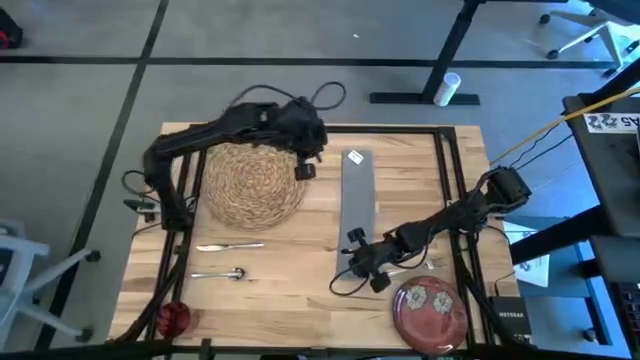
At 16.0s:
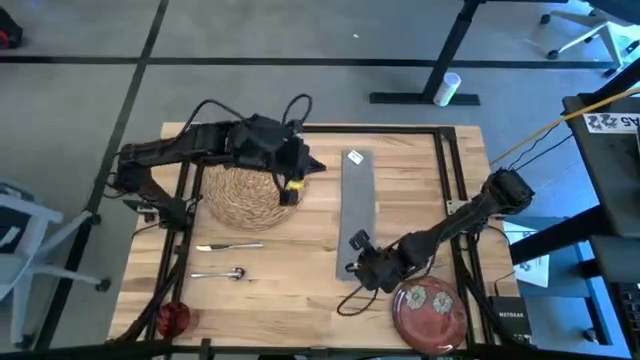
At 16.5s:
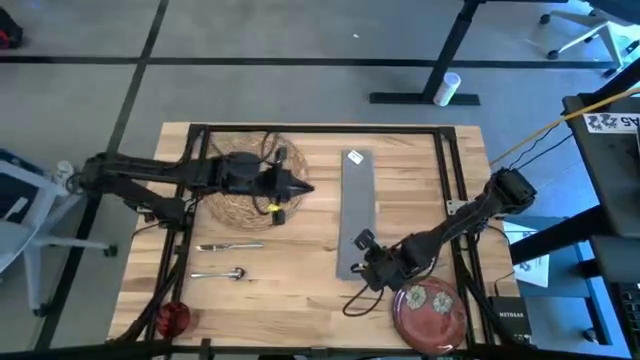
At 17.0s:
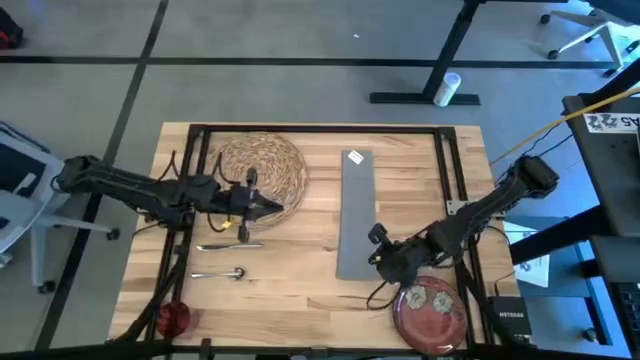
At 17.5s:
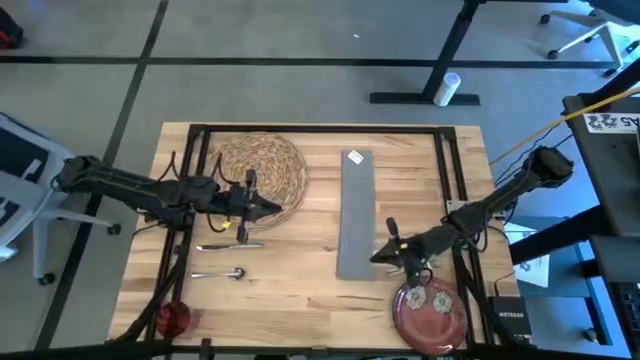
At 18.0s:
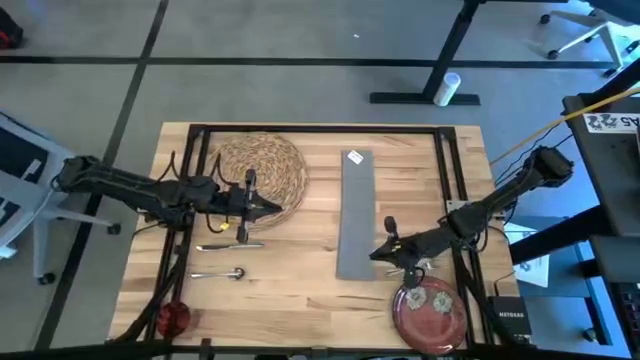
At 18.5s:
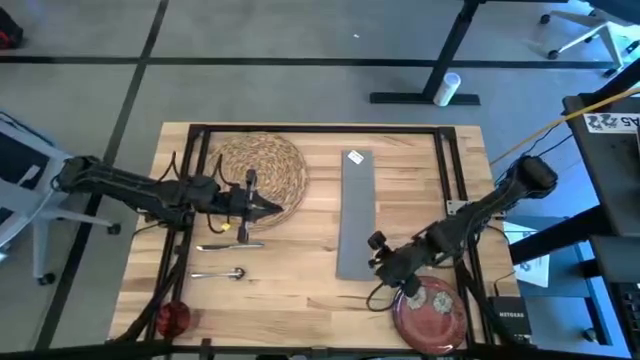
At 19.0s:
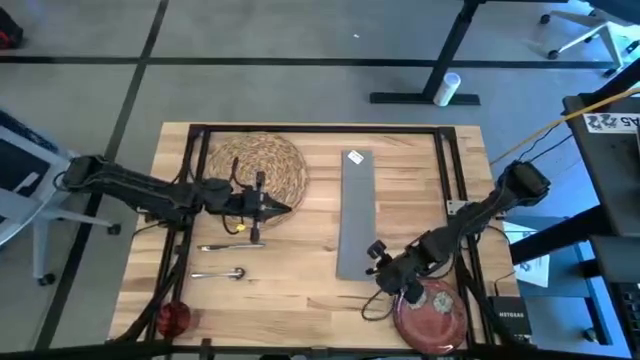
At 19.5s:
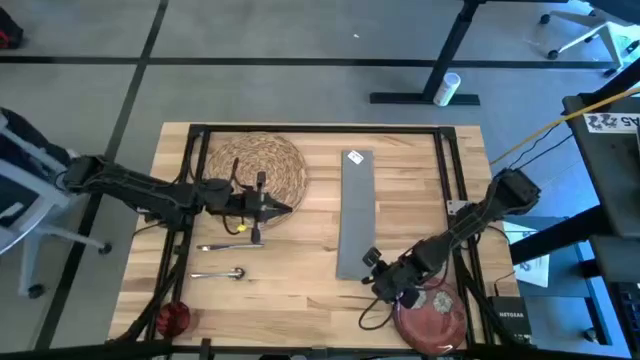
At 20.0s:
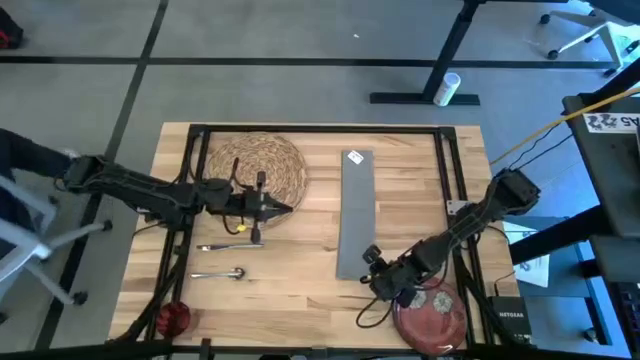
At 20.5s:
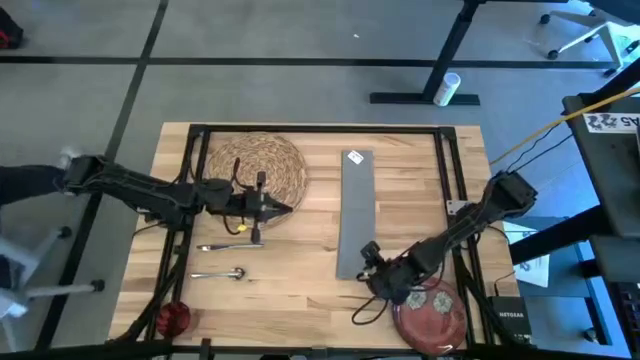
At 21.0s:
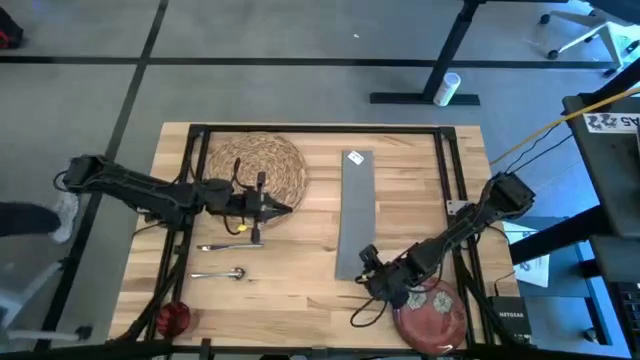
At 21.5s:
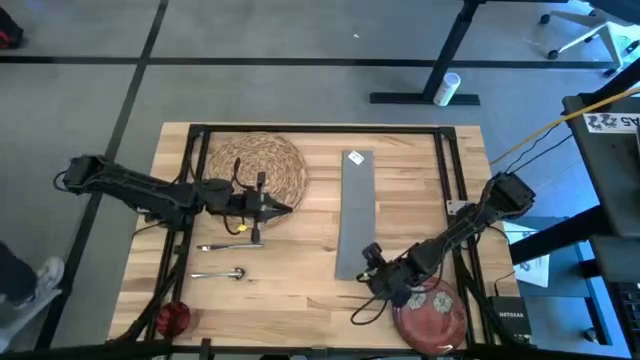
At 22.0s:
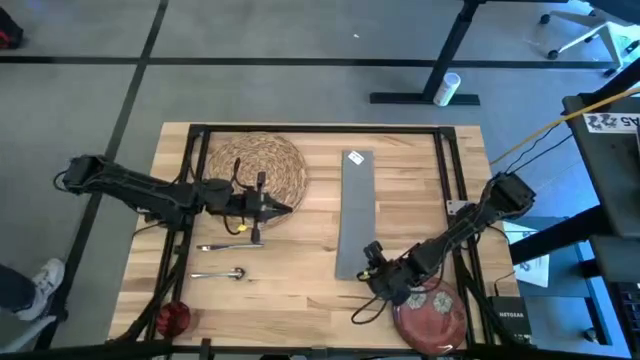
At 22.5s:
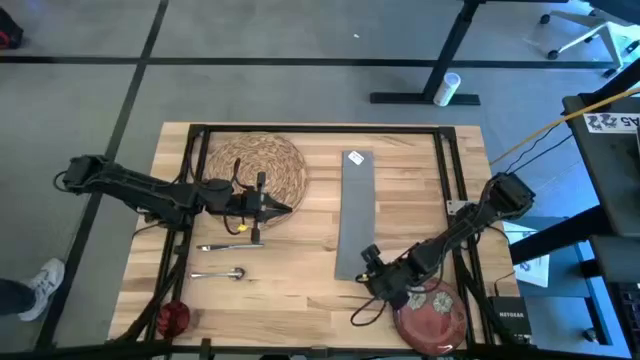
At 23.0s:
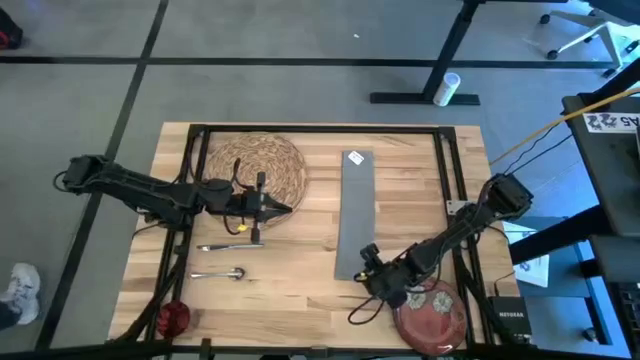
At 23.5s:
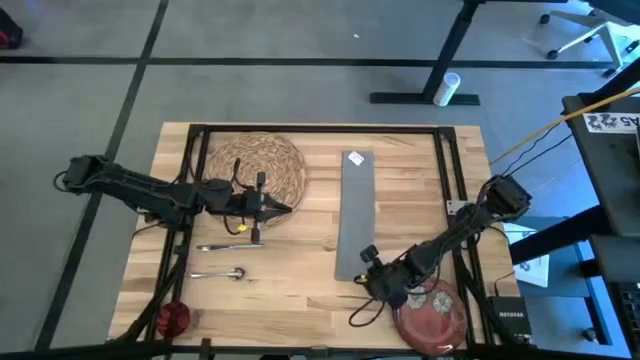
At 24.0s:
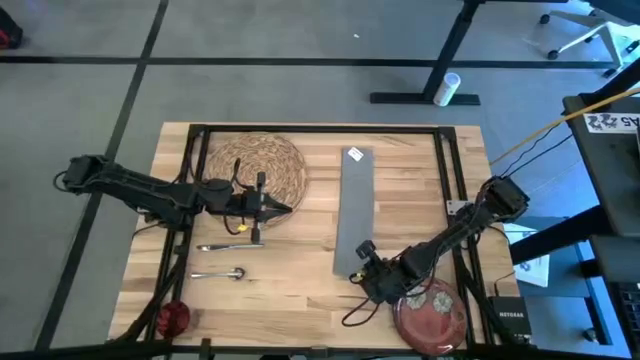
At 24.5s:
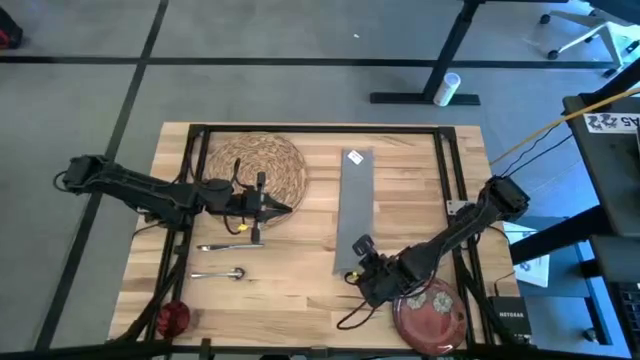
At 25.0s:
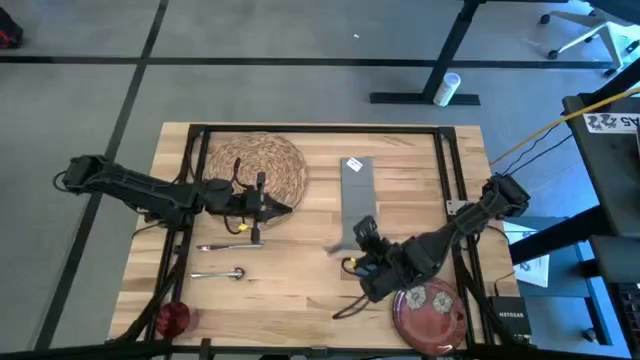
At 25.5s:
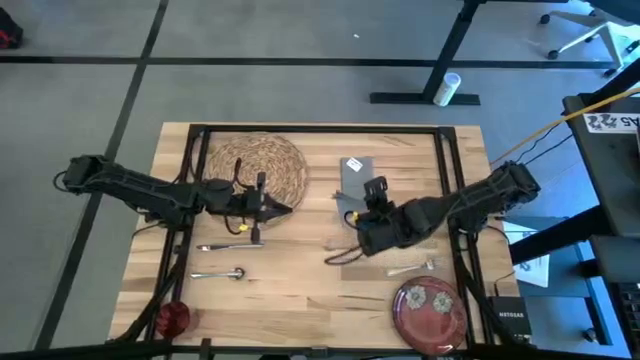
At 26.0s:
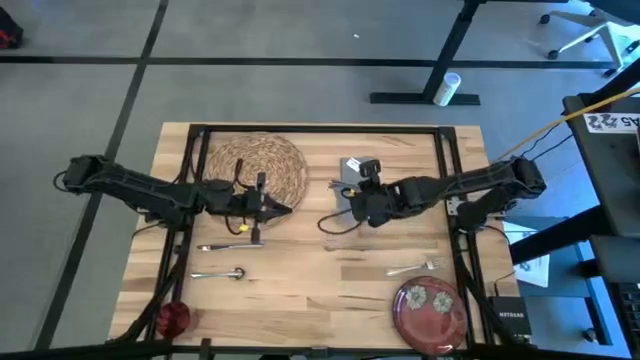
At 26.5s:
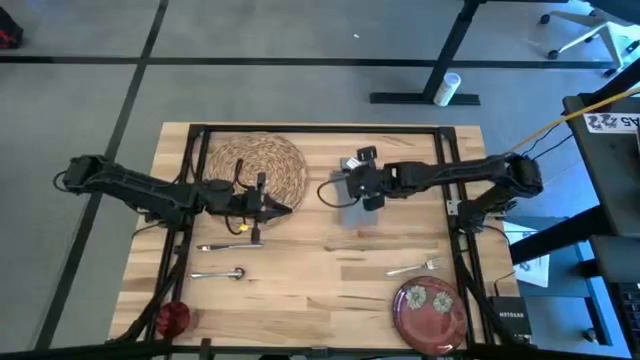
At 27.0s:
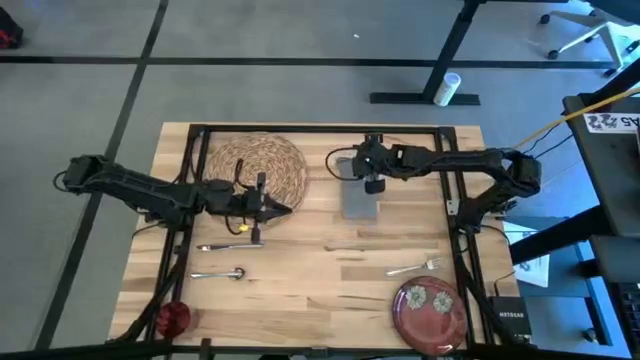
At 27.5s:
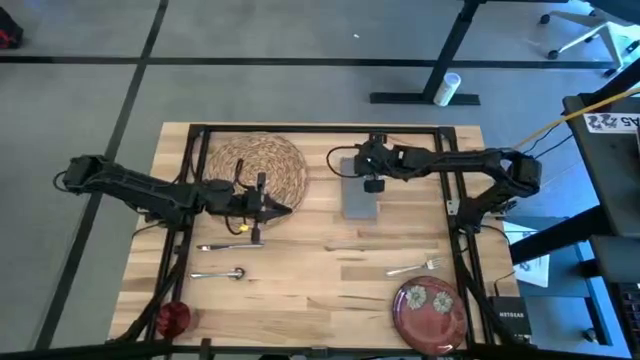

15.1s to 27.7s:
Task: Set table place
Fold the gray table napkin

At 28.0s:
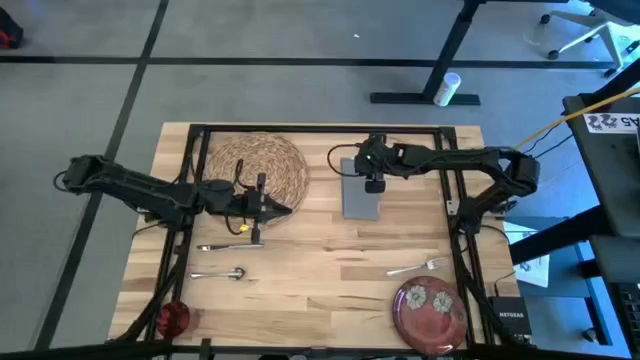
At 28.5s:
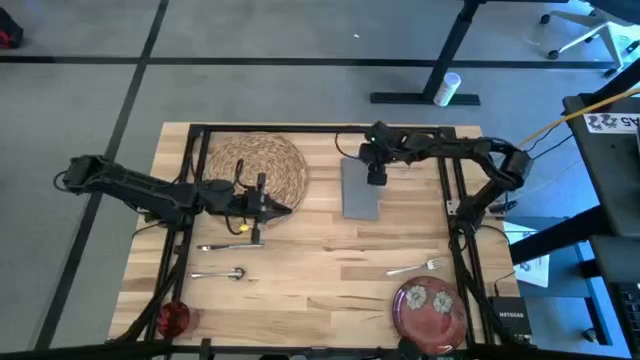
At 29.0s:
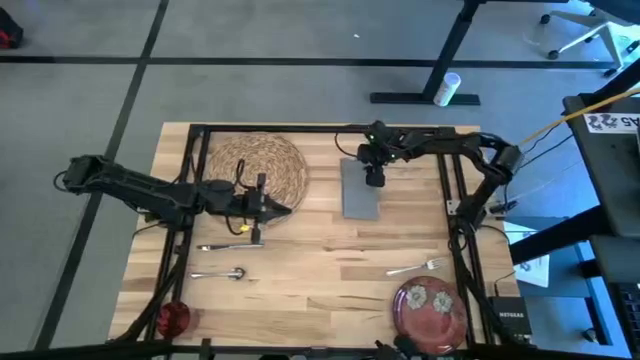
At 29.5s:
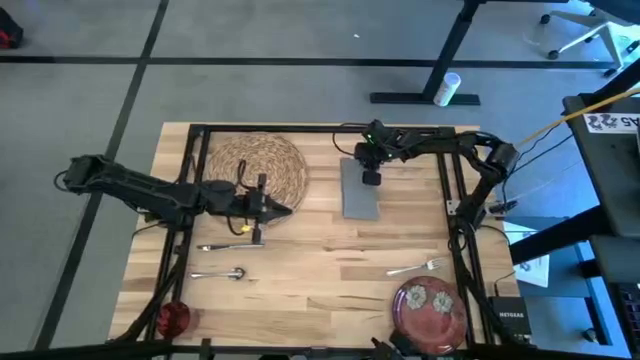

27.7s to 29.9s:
Fold the gray table napkin

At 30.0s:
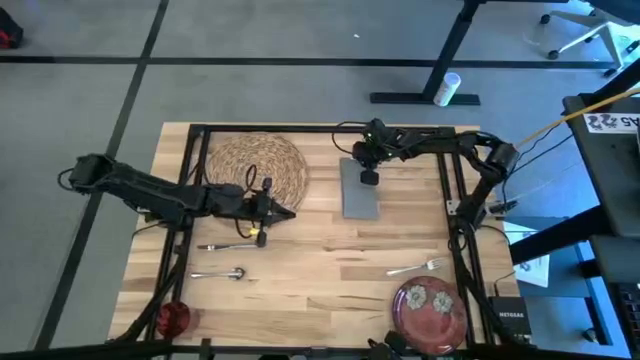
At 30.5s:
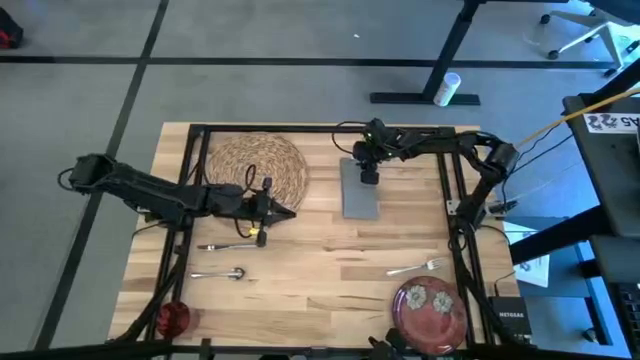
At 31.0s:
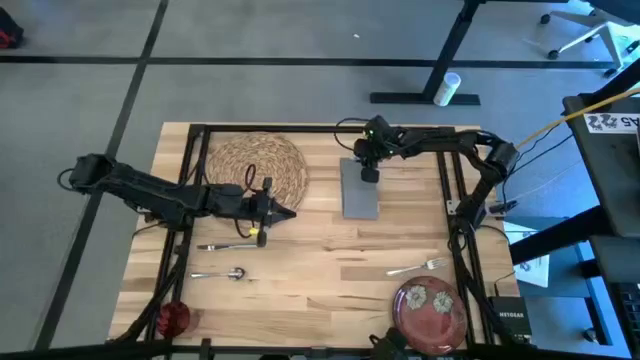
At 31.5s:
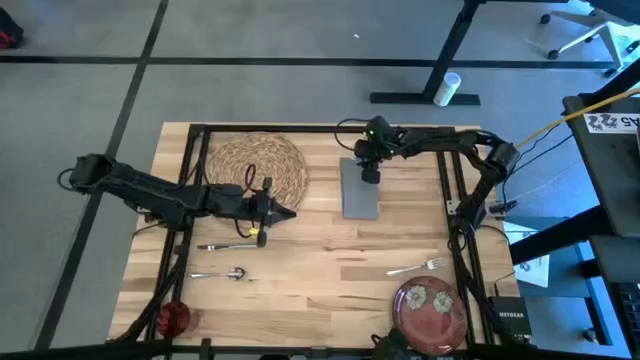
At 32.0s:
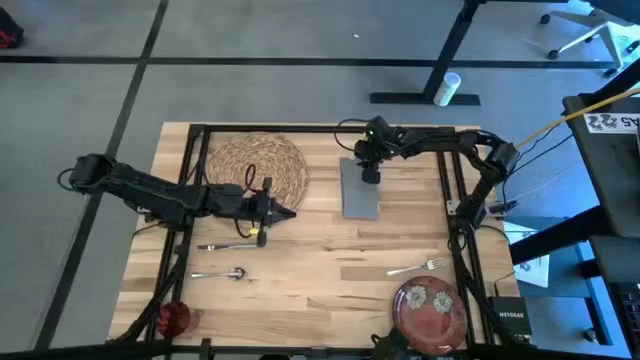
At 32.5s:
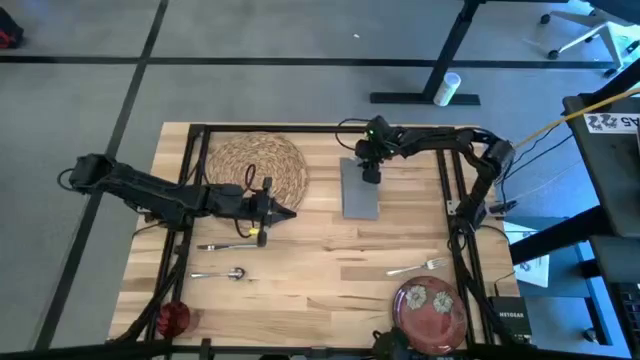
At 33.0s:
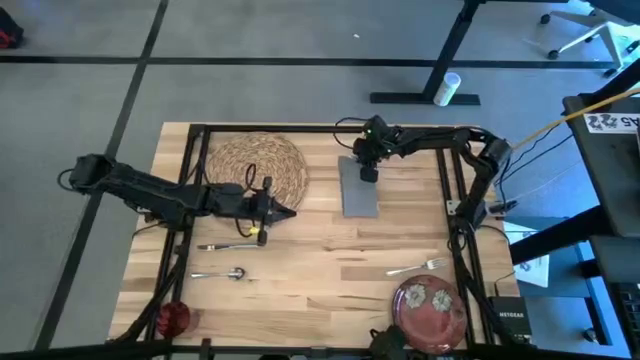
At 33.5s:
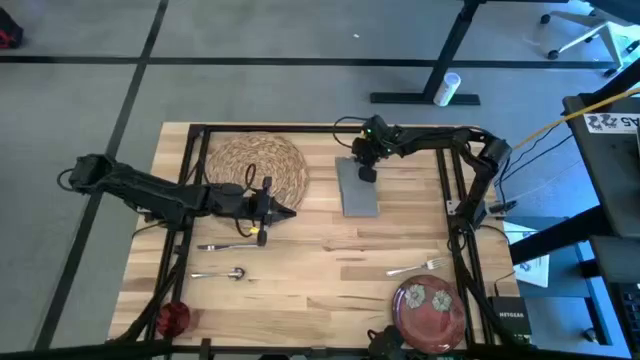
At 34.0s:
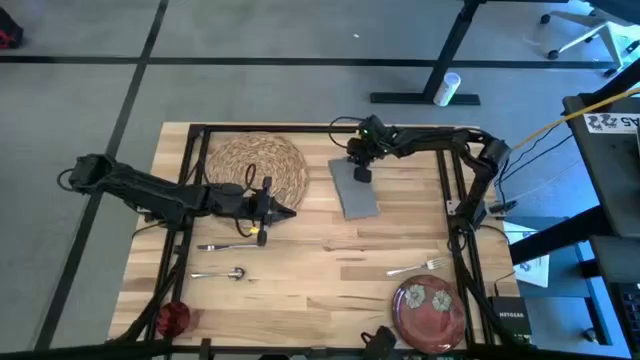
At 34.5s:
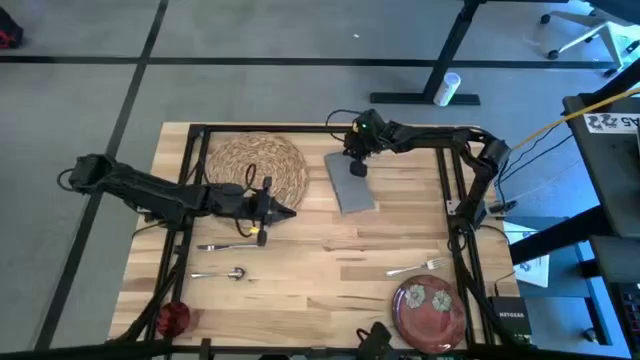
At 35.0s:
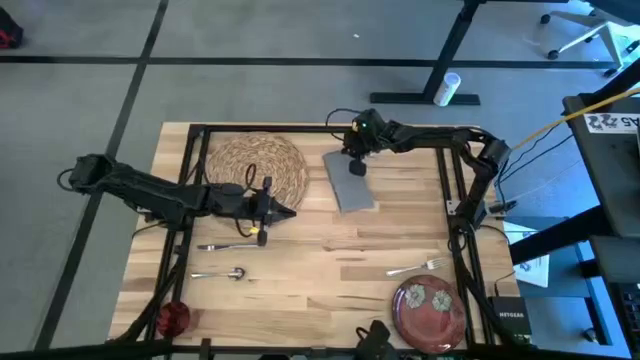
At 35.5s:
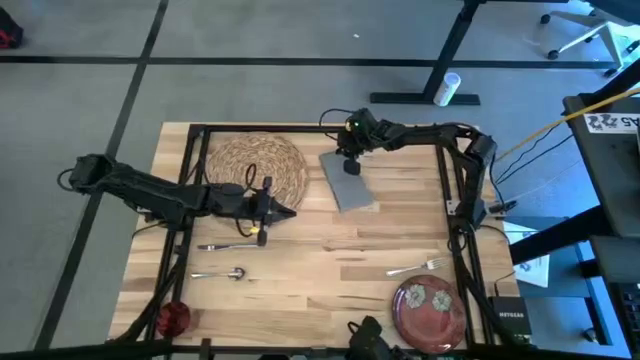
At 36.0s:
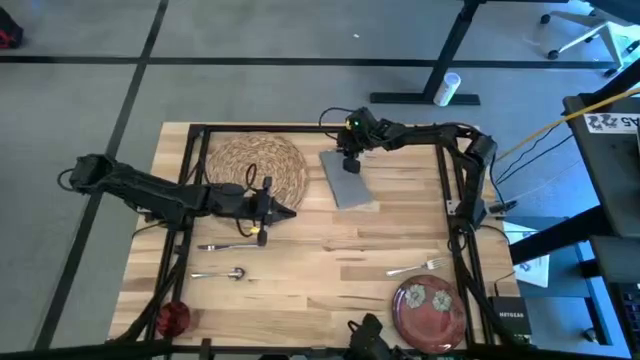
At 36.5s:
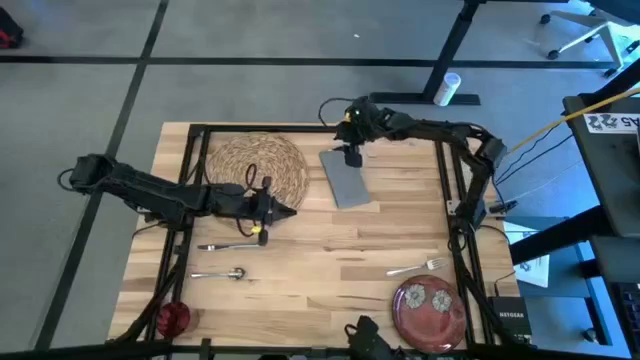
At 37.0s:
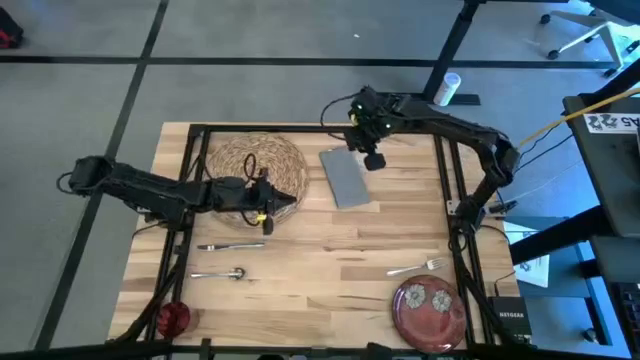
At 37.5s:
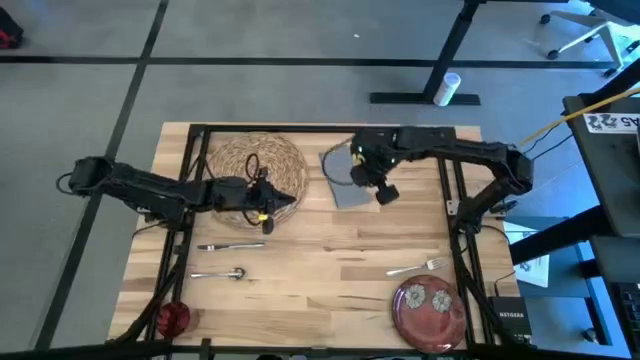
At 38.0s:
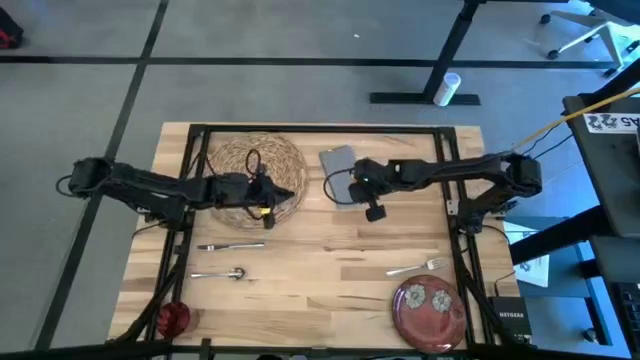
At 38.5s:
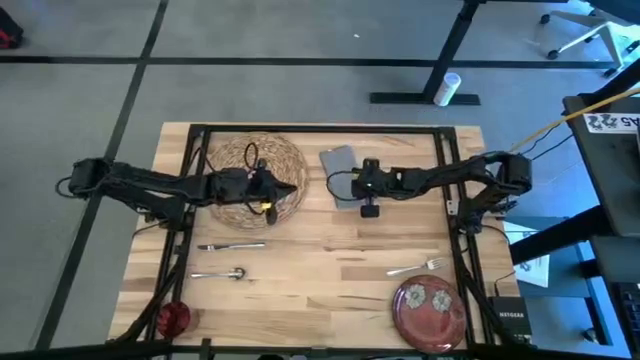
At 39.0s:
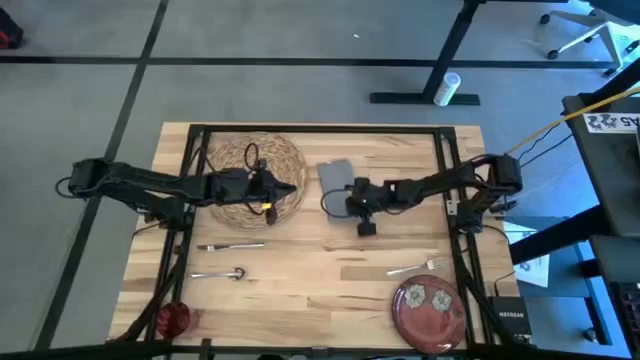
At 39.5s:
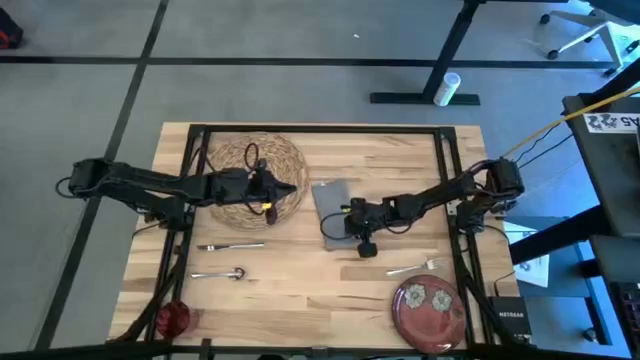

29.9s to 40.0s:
Fold the gray table napkin
